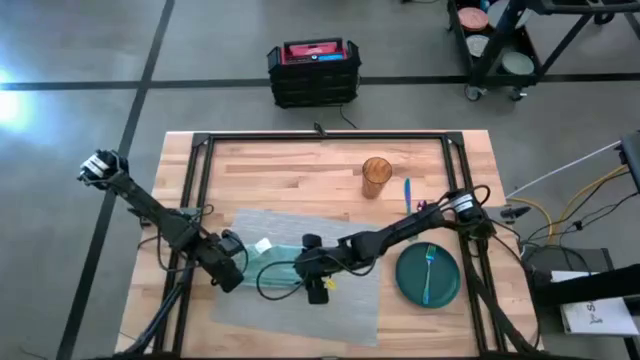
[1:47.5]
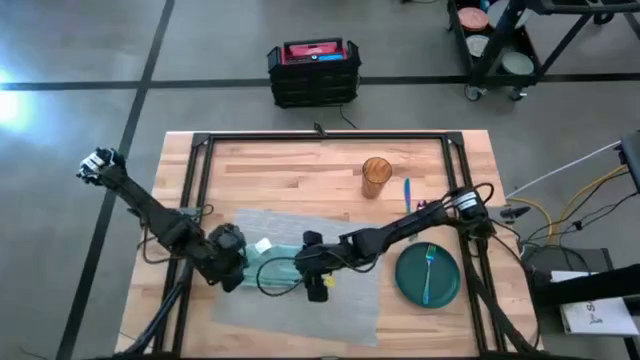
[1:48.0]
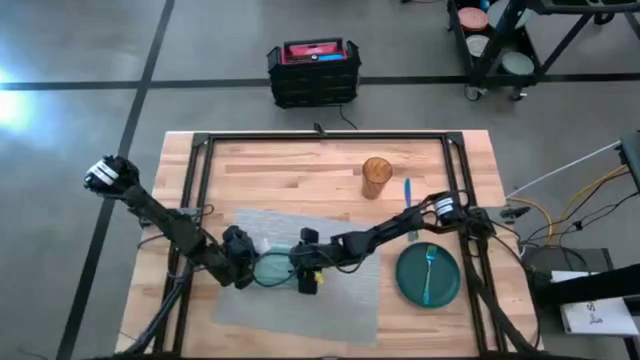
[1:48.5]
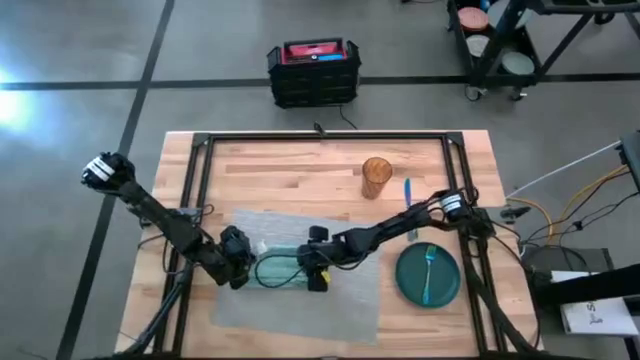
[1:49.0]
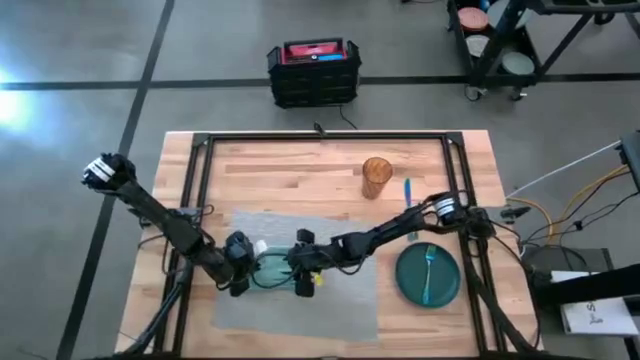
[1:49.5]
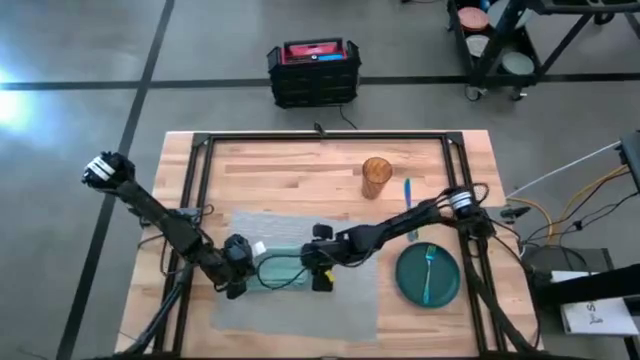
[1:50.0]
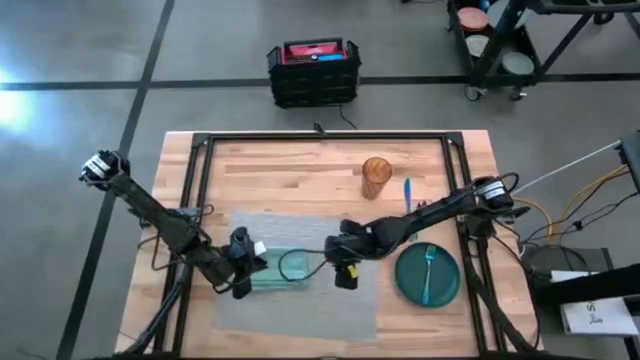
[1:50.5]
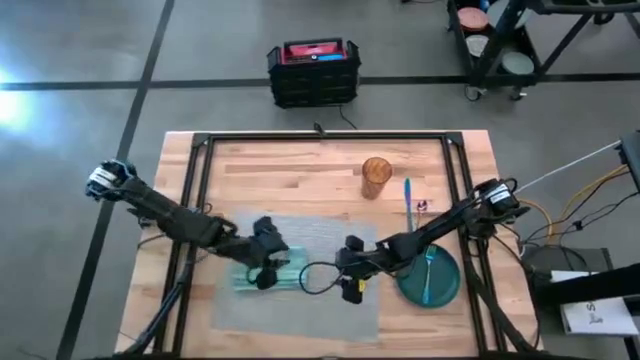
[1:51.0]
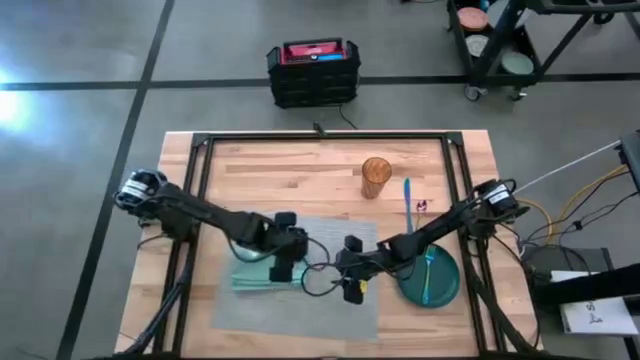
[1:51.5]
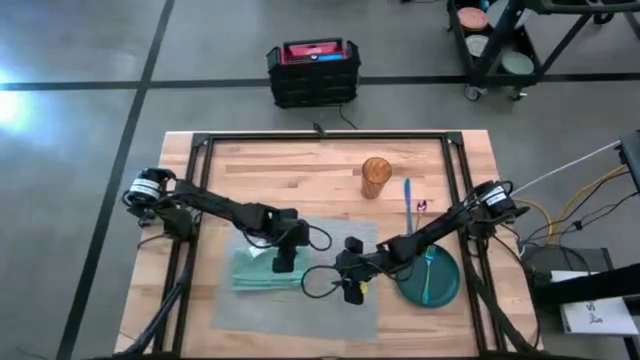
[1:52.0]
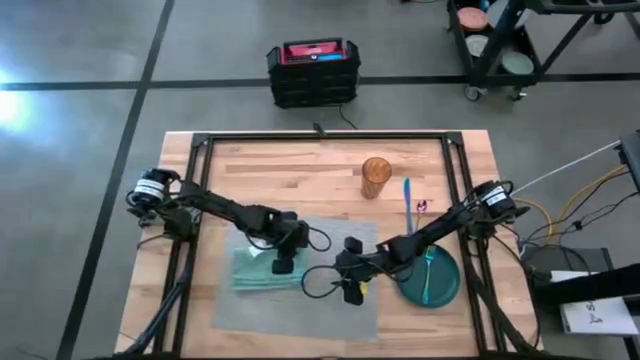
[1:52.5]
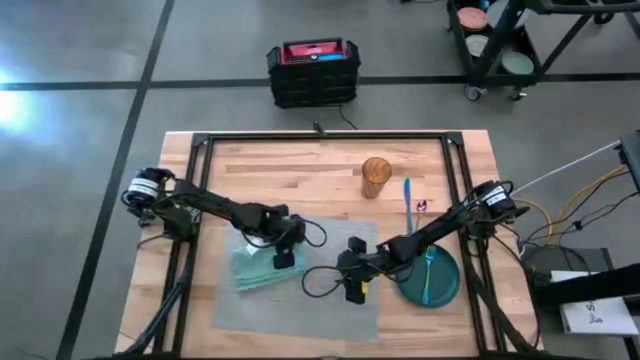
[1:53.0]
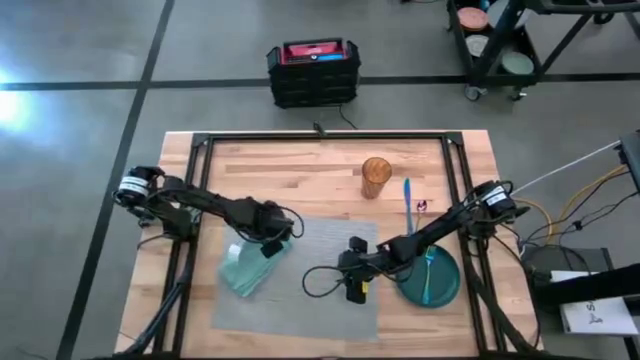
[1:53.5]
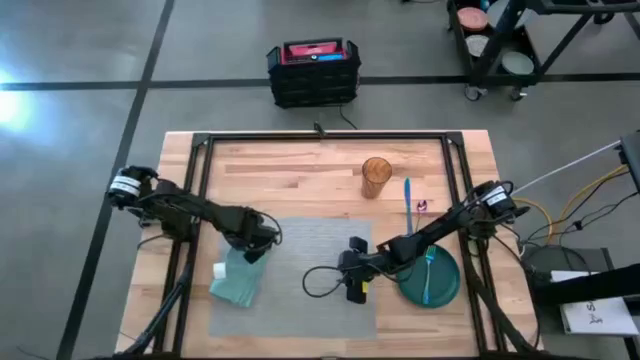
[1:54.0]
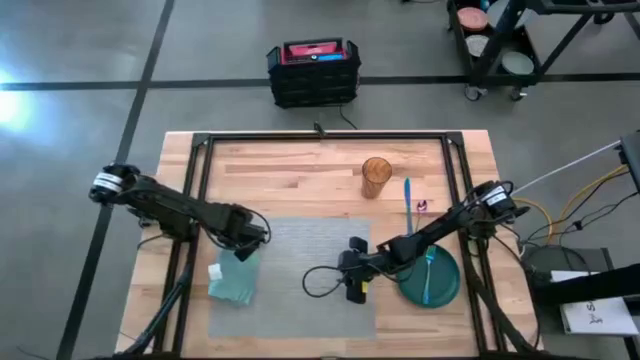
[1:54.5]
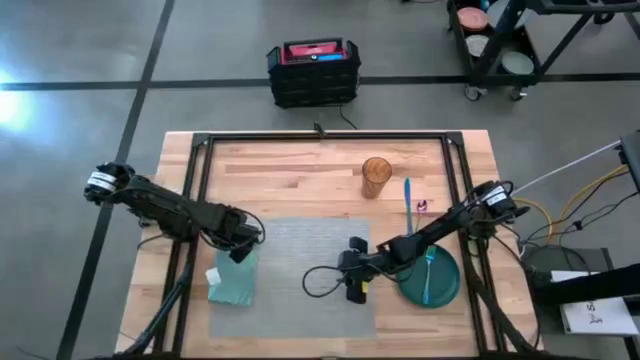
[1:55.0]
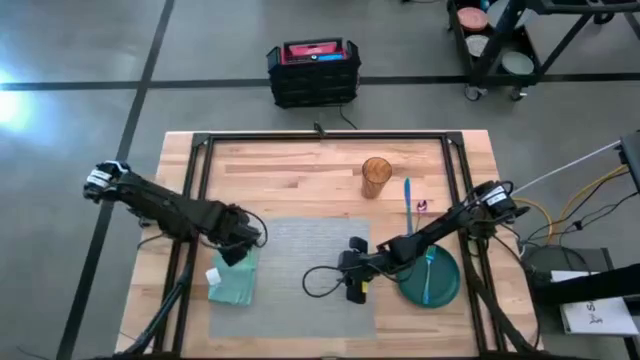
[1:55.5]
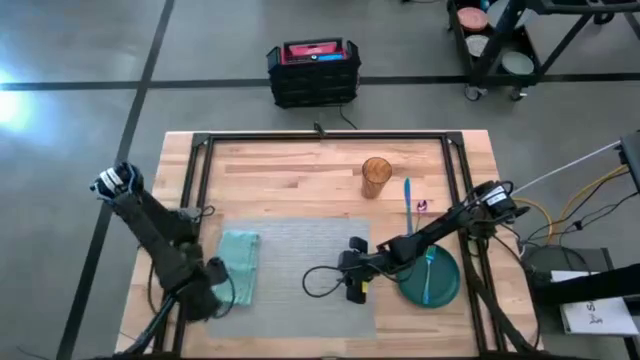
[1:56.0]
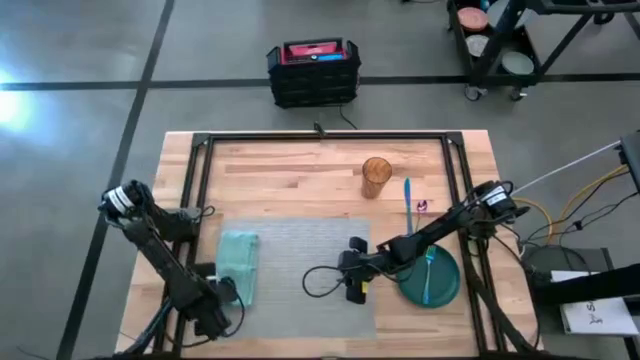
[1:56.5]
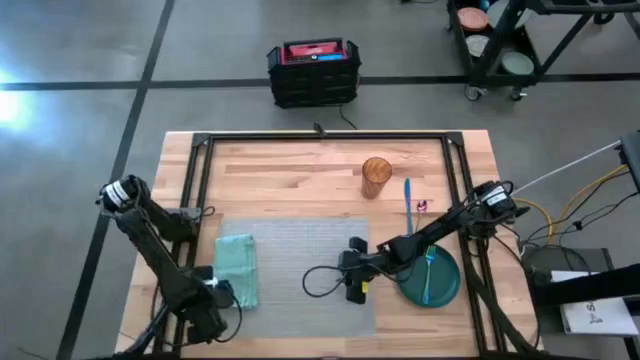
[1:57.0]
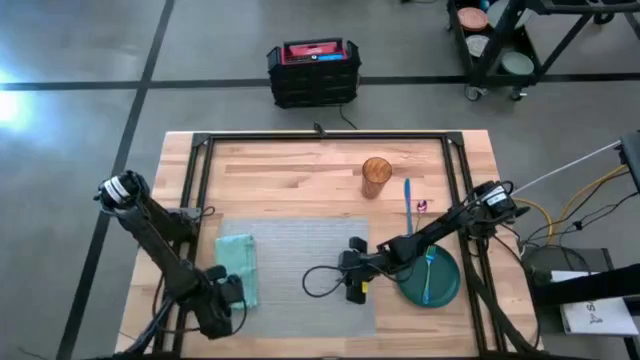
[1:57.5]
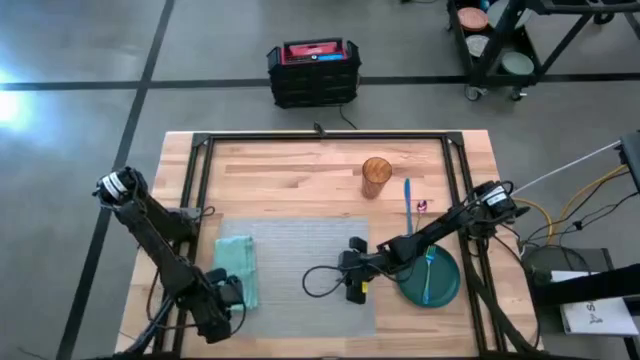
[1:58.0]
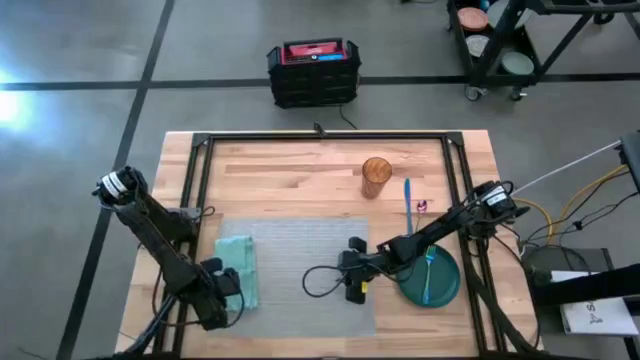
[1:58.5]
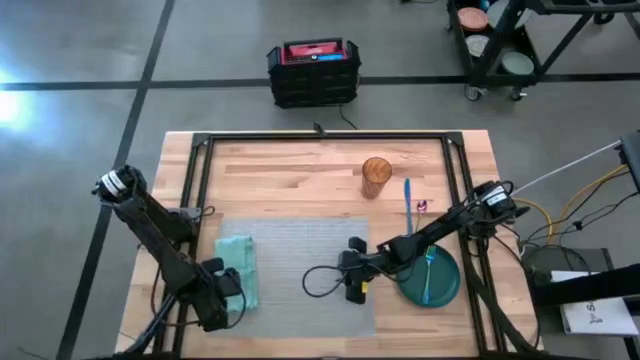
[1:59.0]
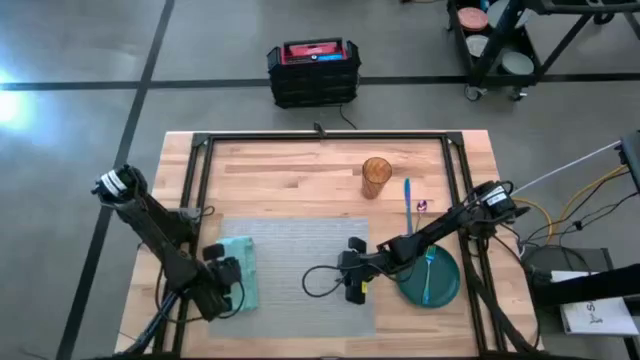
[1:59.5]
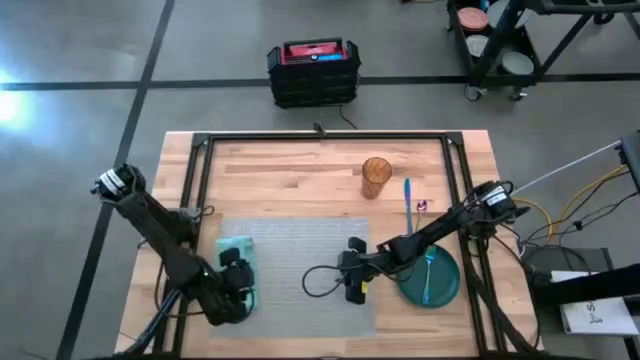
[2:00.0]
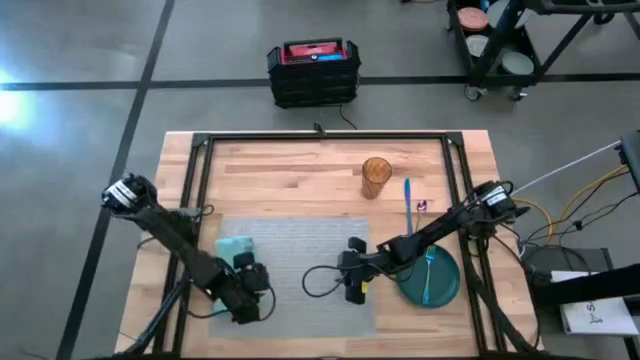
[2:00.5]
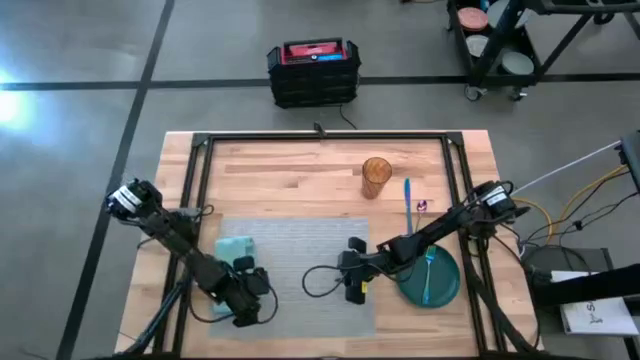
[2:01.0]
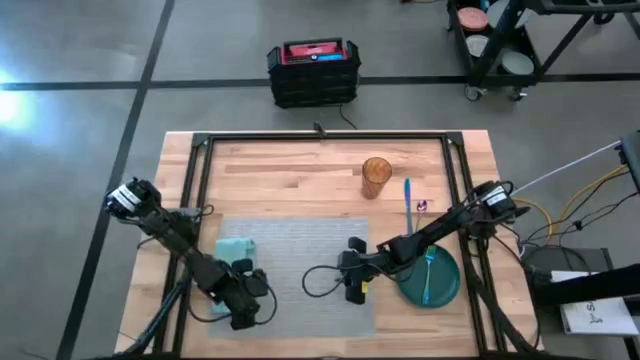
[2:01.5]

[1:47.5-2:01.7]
Task: Set table place
Move the folded blue table napkin to the left side of the gray table mat

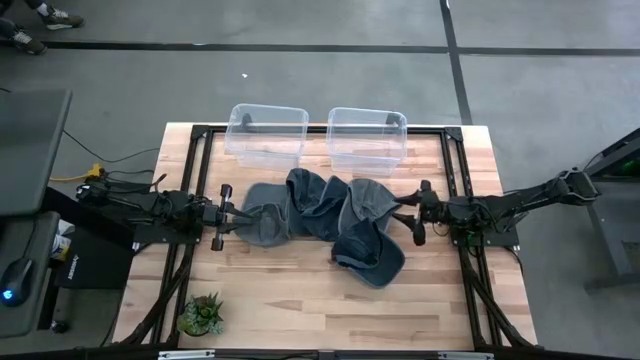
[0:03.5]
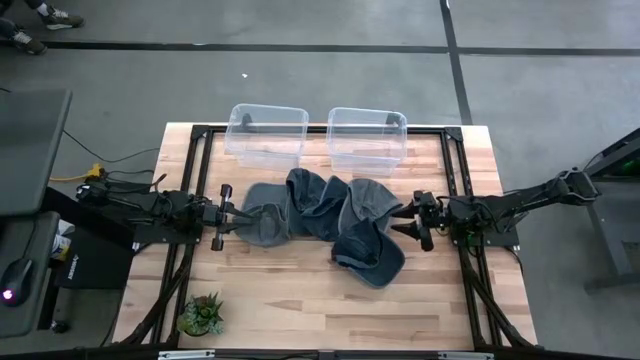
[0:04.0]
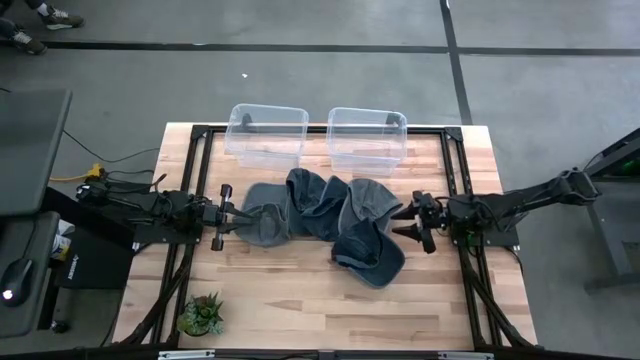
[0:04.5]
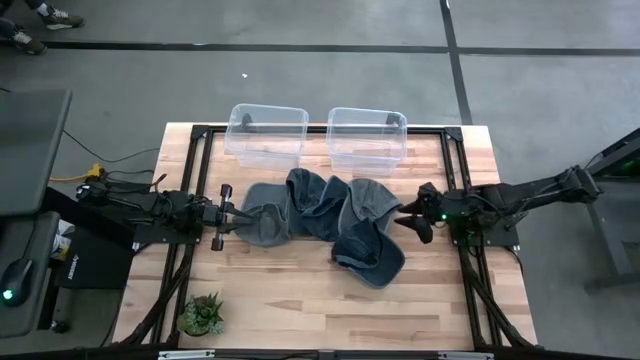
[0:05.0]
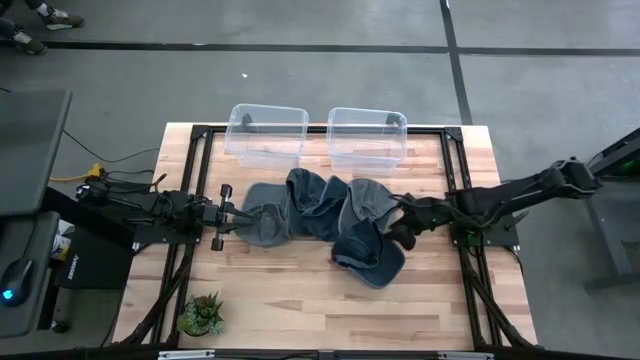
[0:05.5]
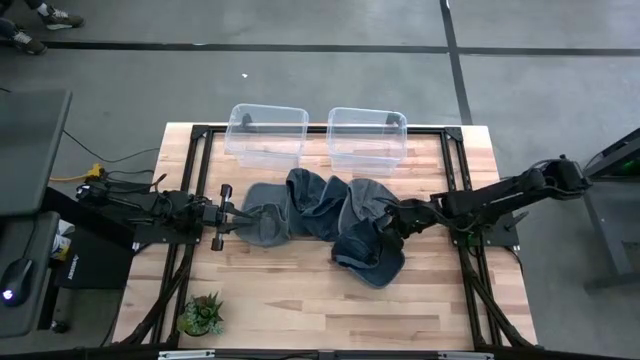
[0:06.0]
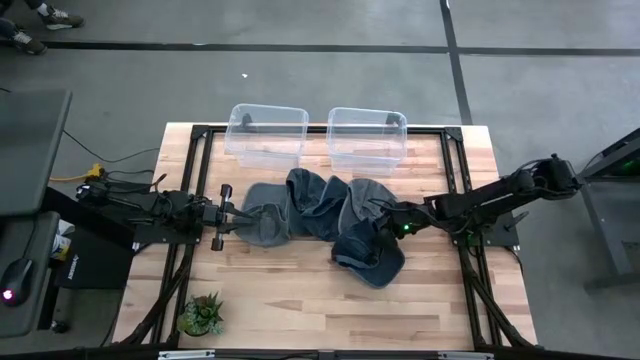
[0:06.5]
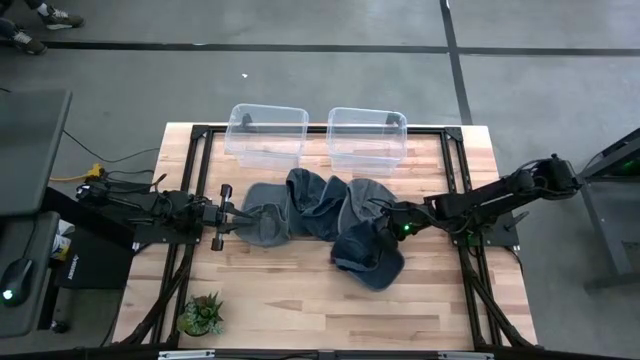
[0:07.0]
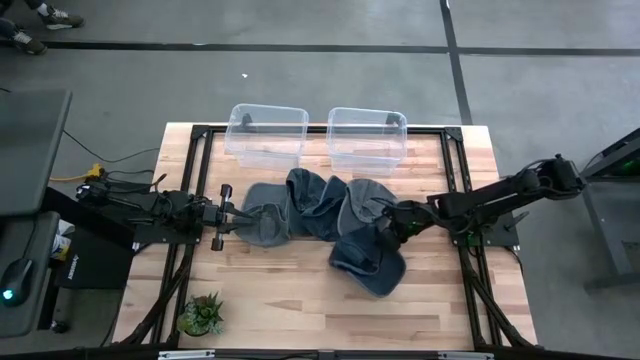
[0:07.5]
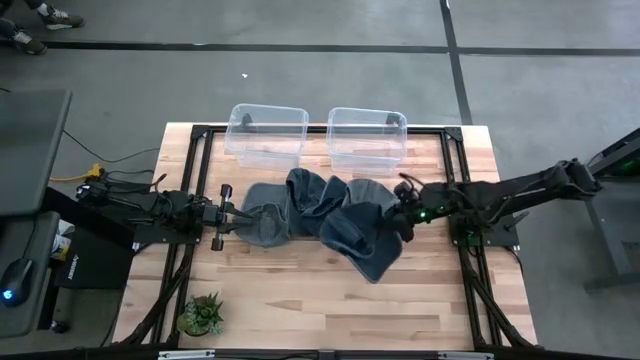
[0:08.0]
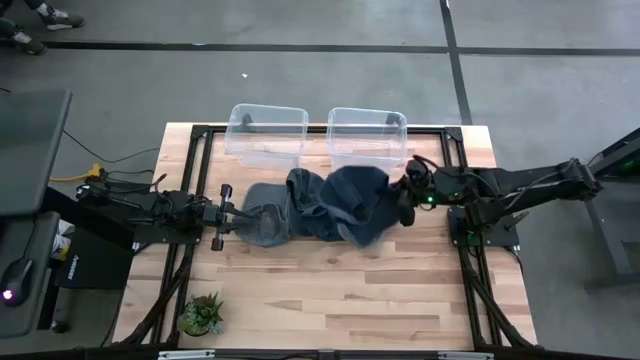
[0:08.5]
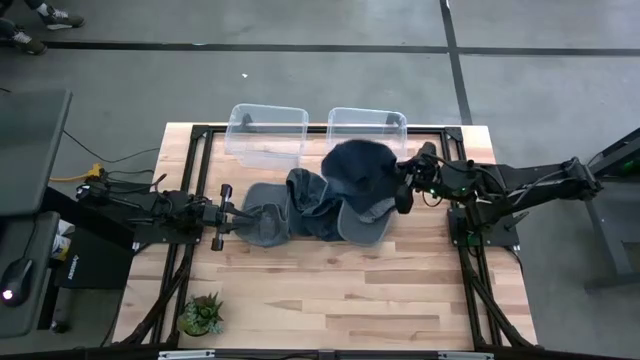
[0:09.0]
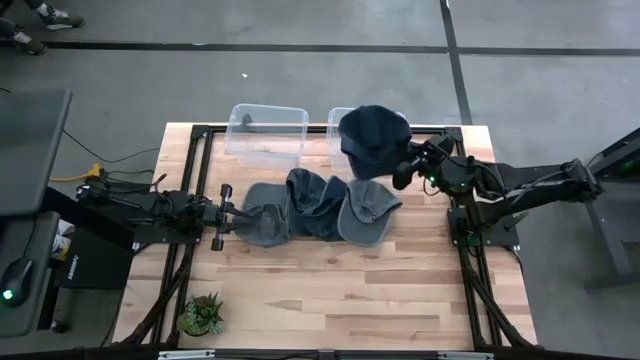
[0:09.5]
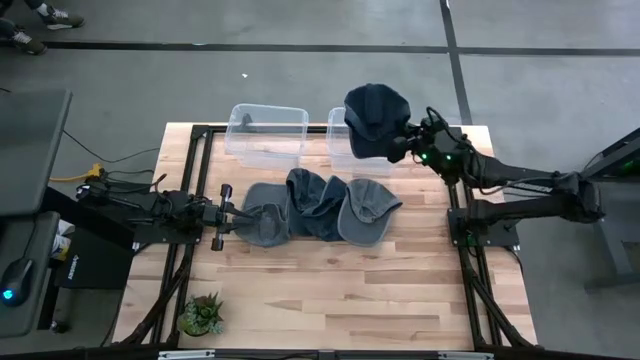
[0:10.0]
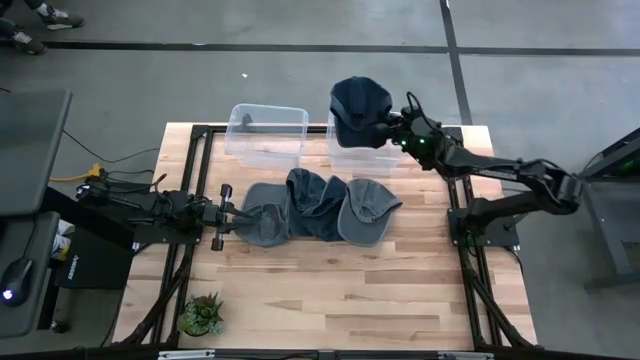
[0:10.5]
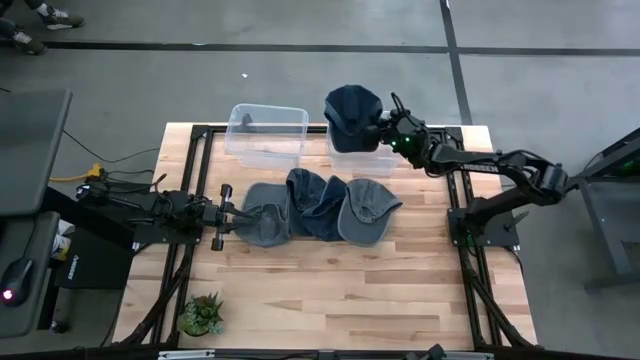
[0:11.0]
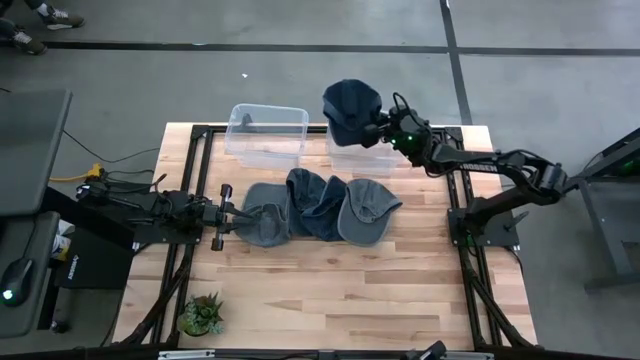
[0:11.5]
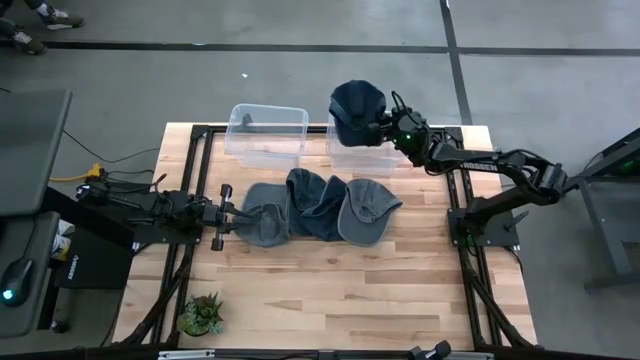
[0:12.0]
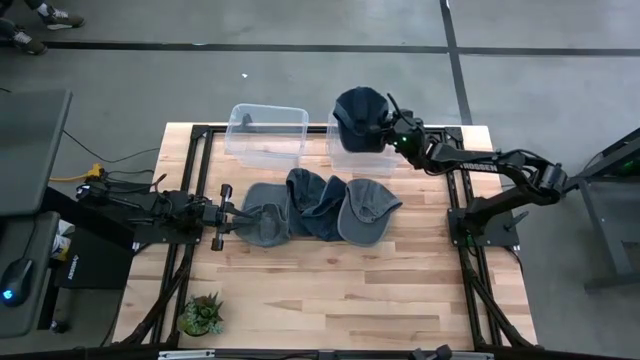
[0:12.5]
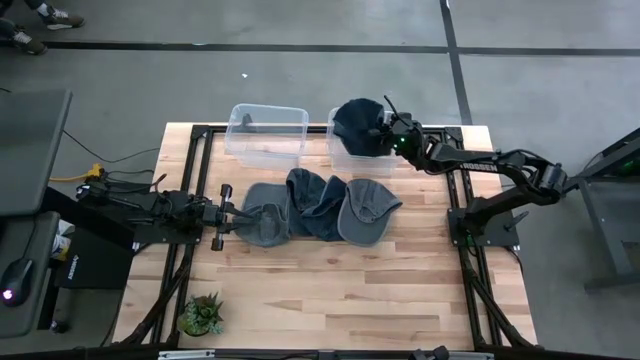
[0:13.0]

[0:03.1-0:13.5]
Task: Pick & Place hat
Put the bottom black cap into the right transparent bin
